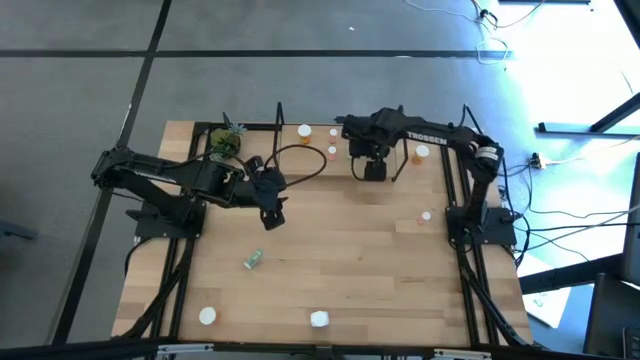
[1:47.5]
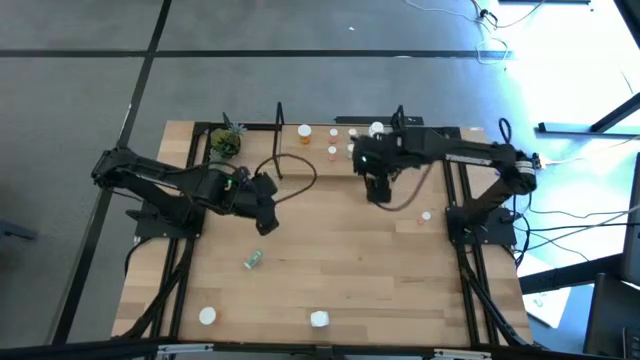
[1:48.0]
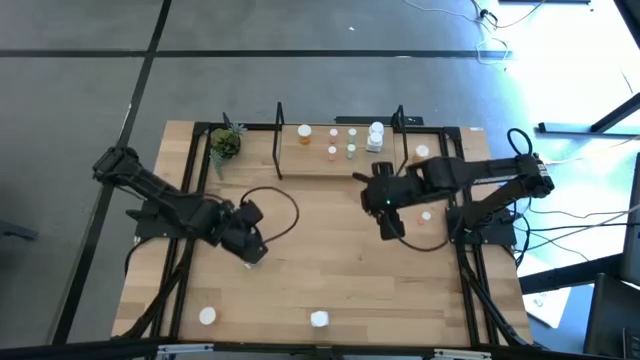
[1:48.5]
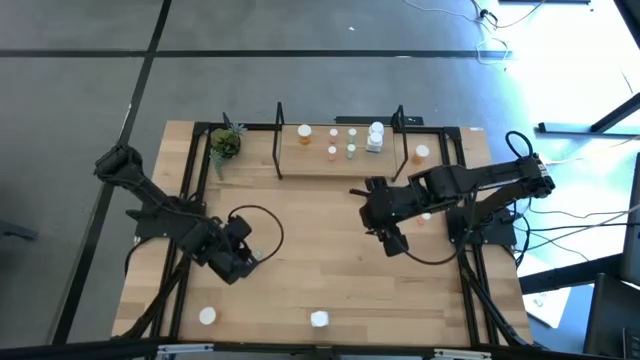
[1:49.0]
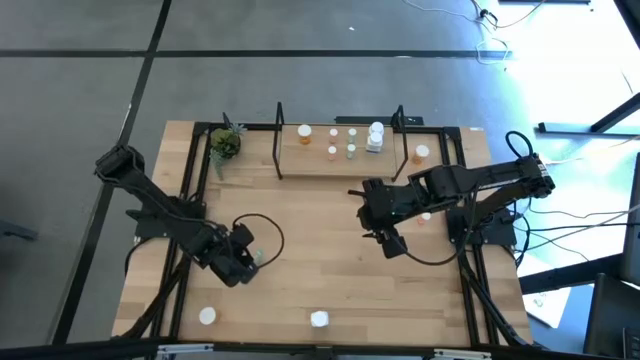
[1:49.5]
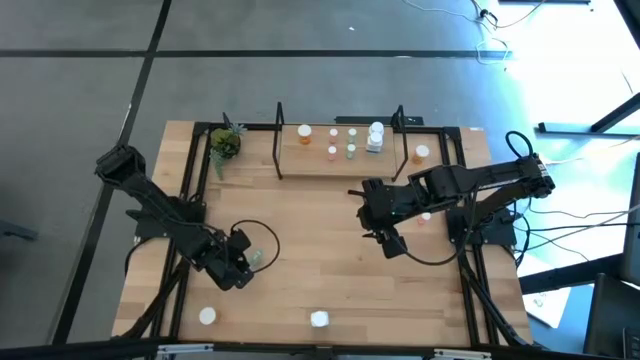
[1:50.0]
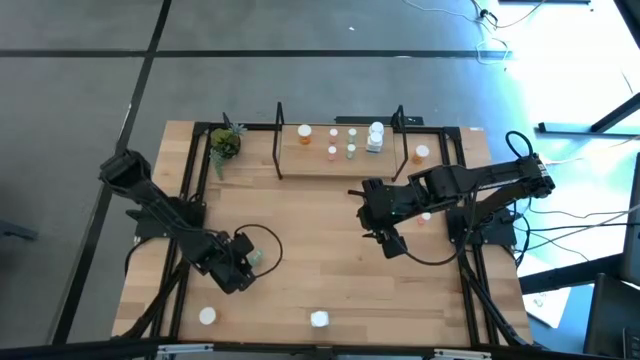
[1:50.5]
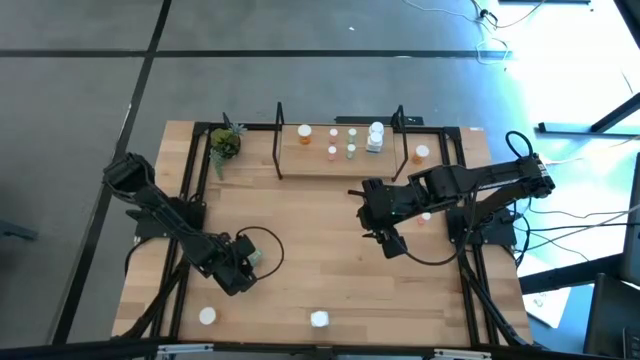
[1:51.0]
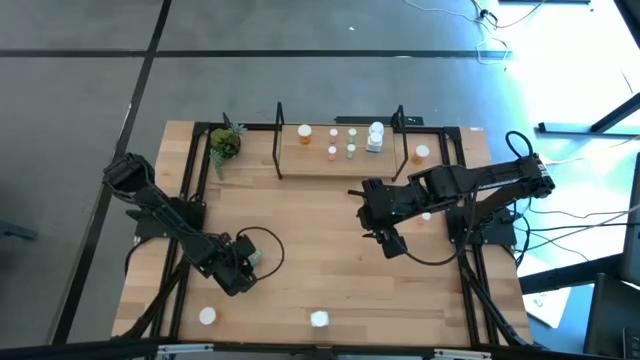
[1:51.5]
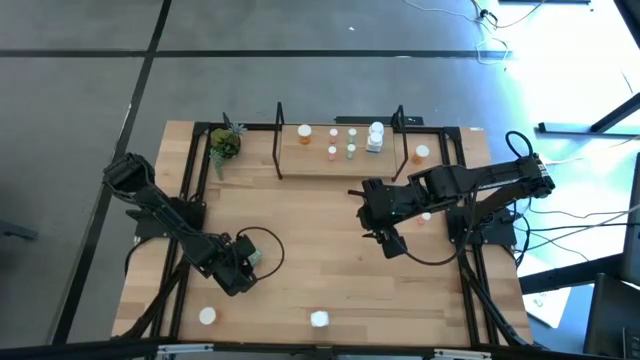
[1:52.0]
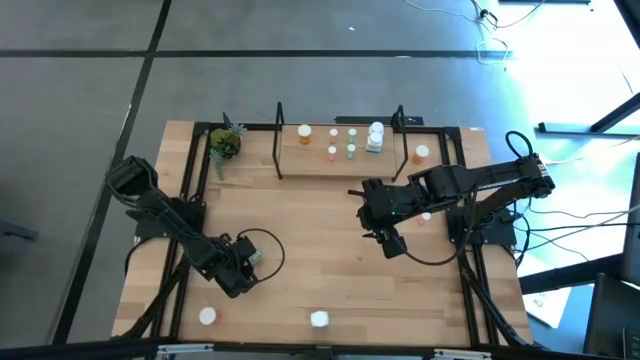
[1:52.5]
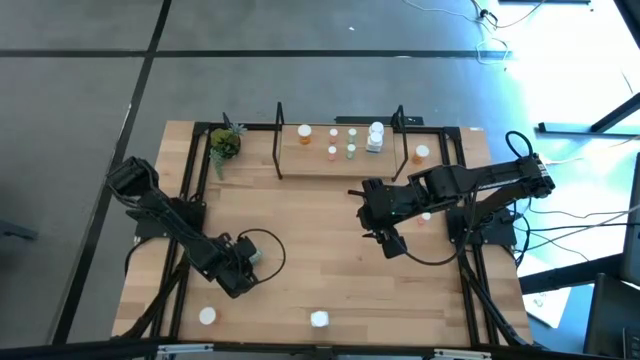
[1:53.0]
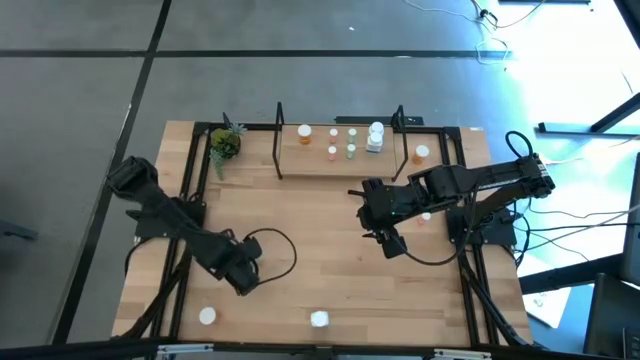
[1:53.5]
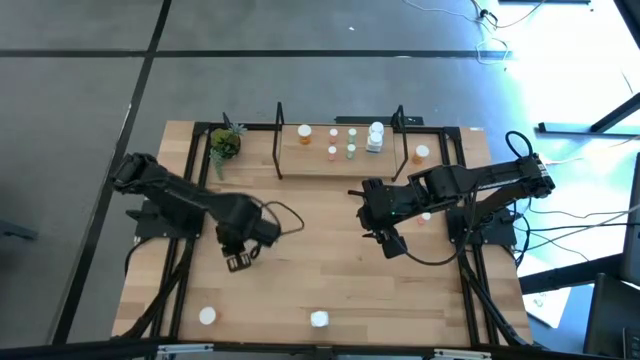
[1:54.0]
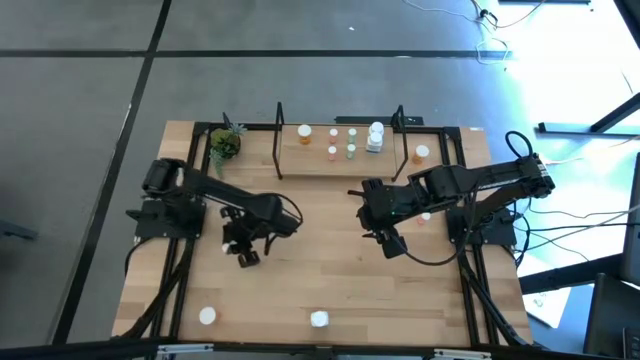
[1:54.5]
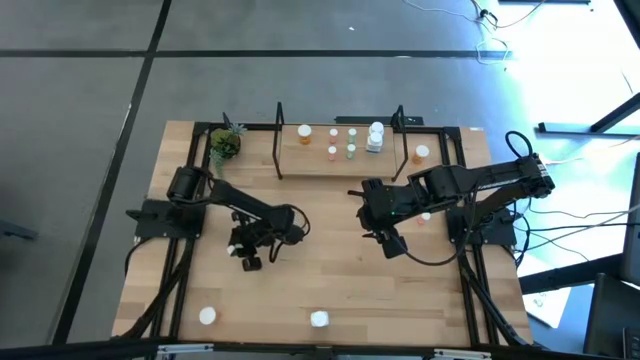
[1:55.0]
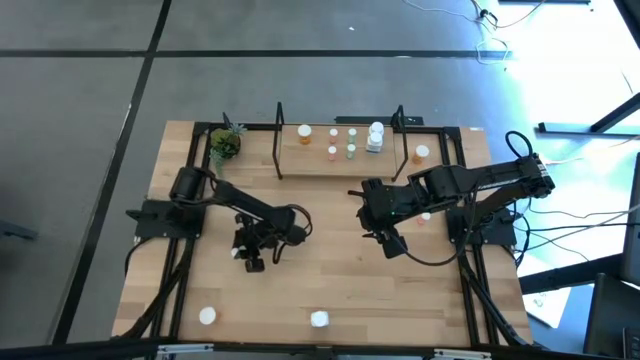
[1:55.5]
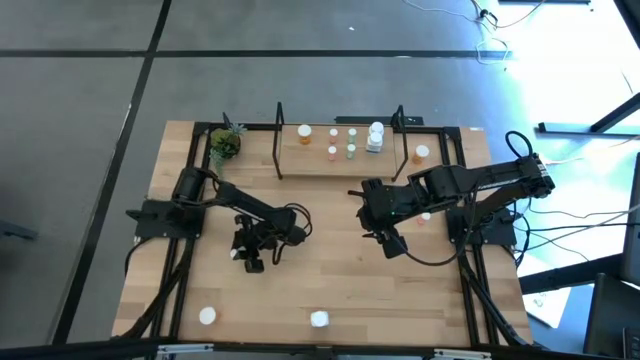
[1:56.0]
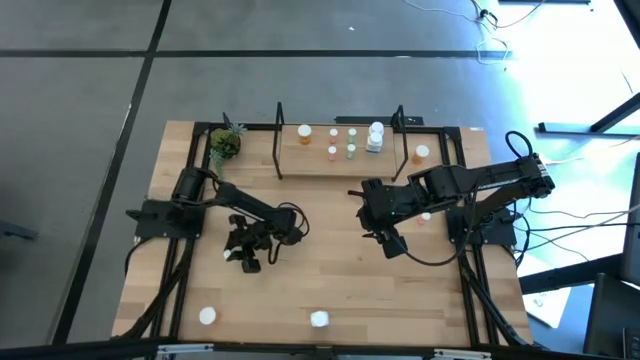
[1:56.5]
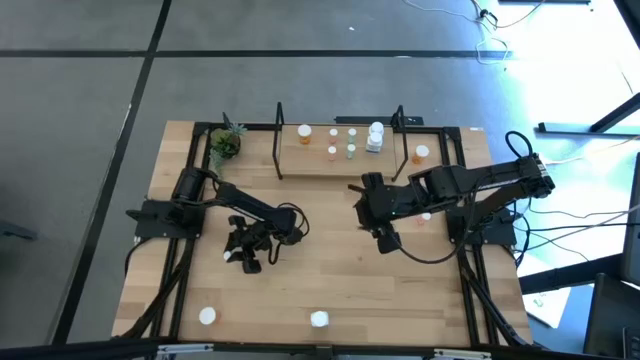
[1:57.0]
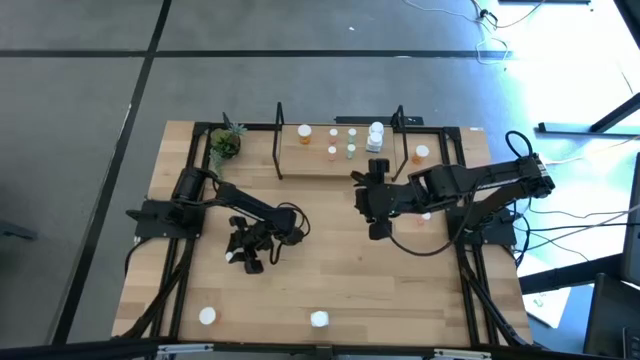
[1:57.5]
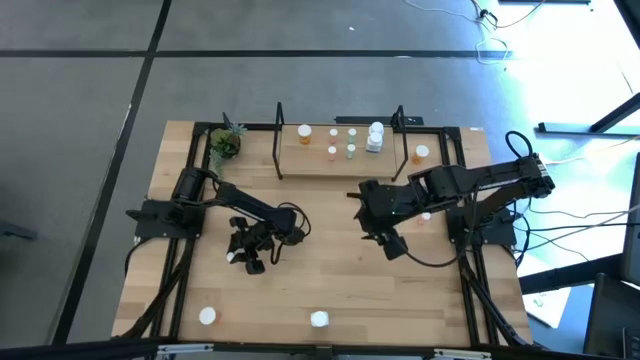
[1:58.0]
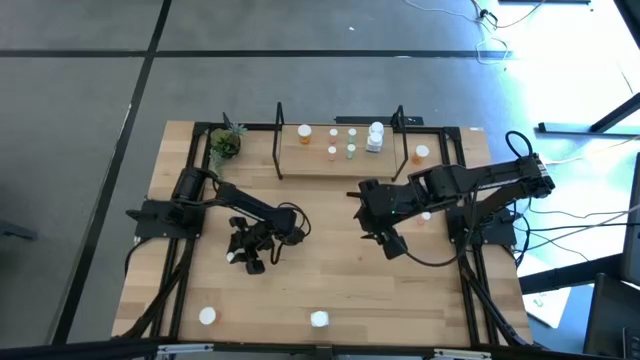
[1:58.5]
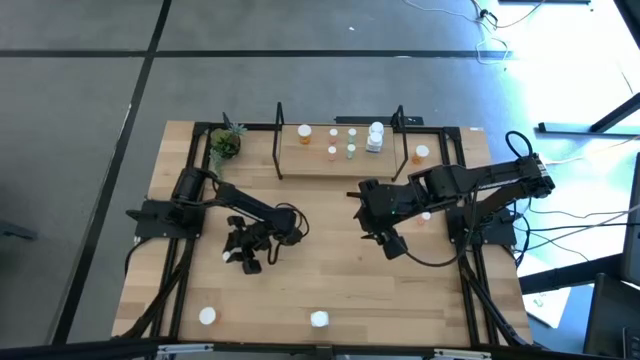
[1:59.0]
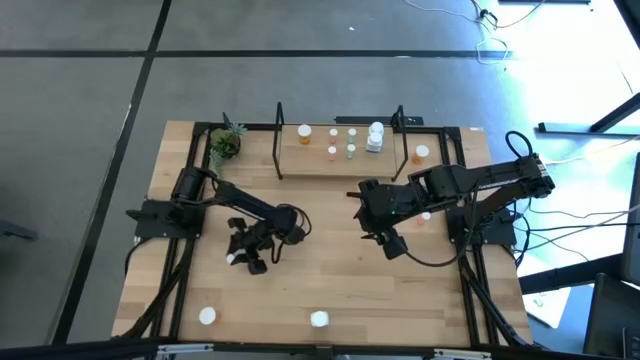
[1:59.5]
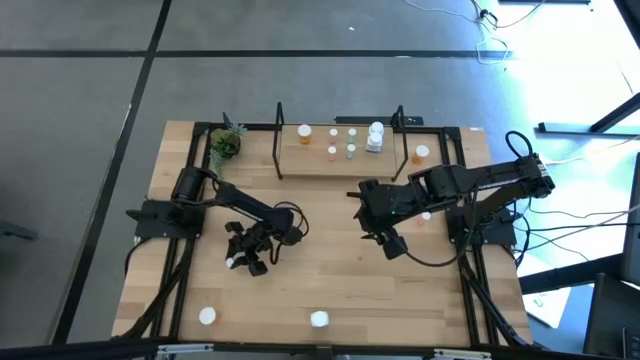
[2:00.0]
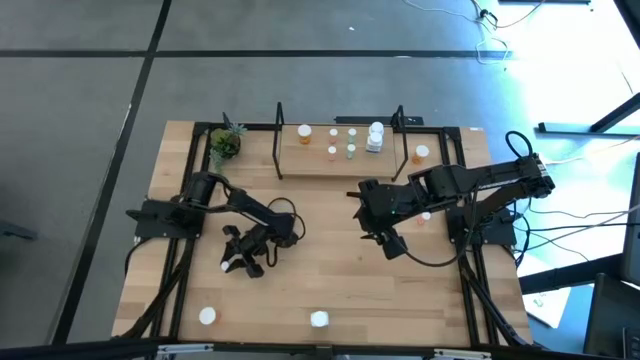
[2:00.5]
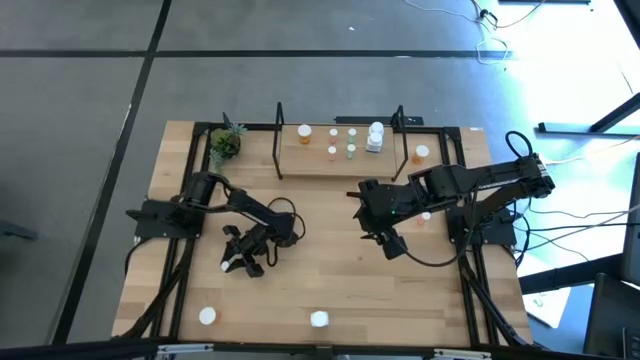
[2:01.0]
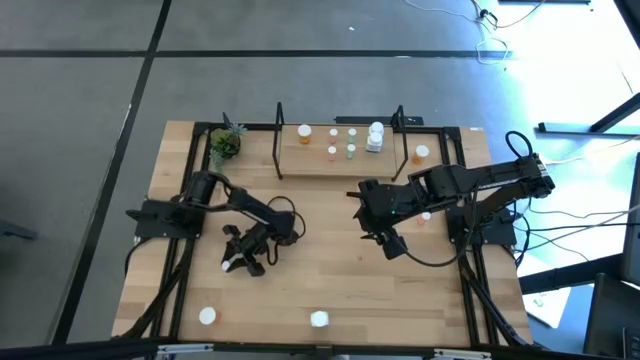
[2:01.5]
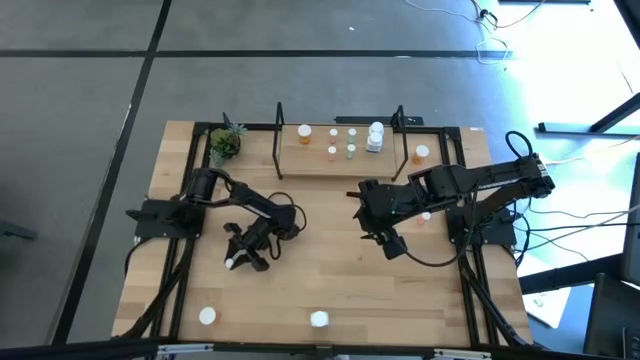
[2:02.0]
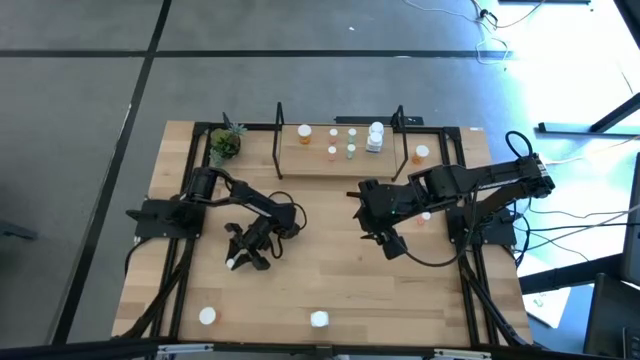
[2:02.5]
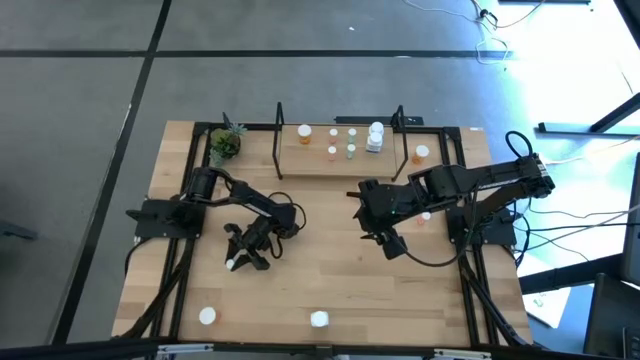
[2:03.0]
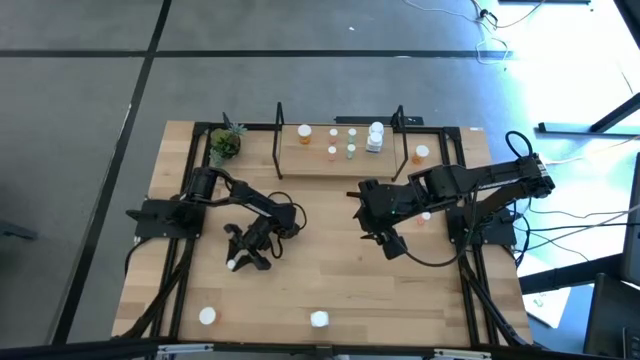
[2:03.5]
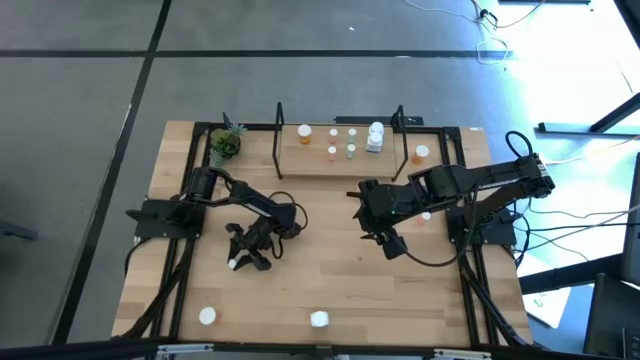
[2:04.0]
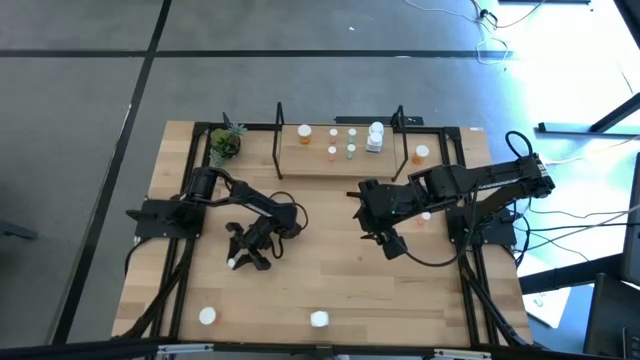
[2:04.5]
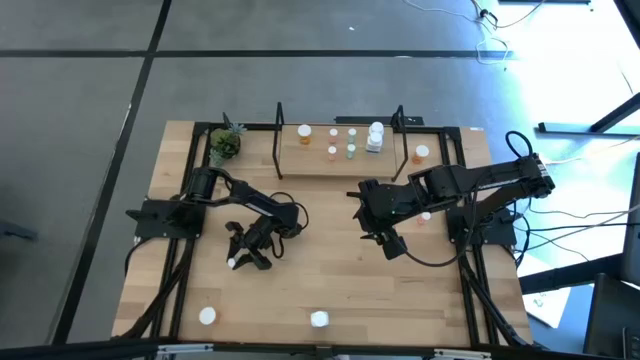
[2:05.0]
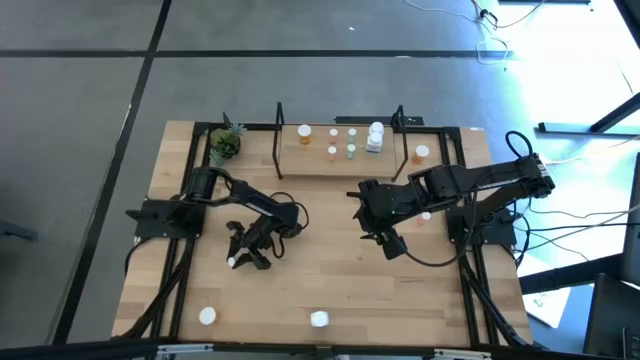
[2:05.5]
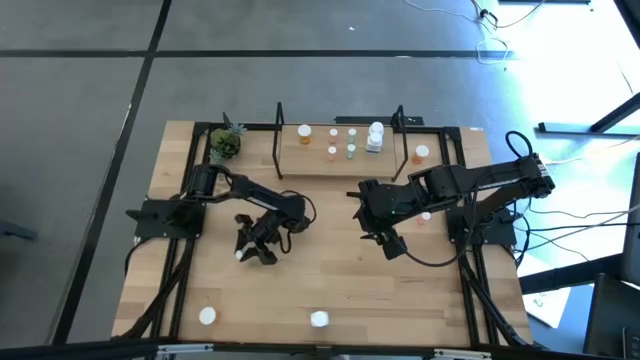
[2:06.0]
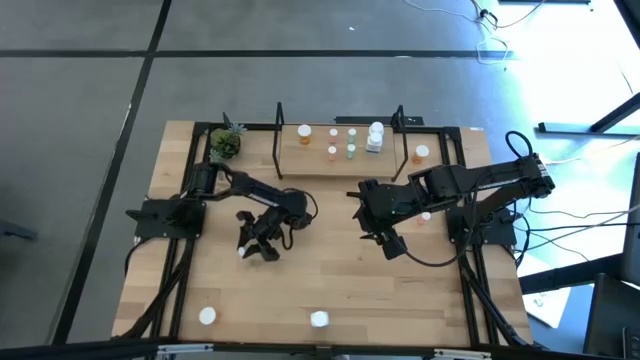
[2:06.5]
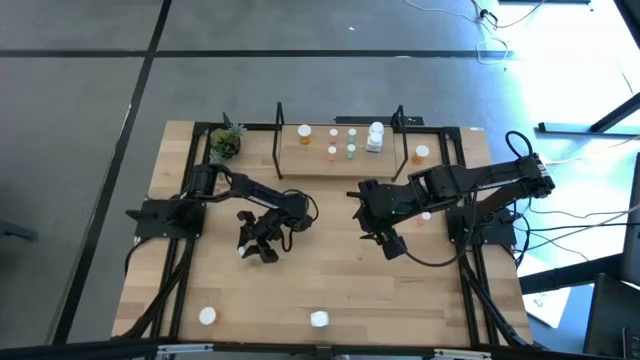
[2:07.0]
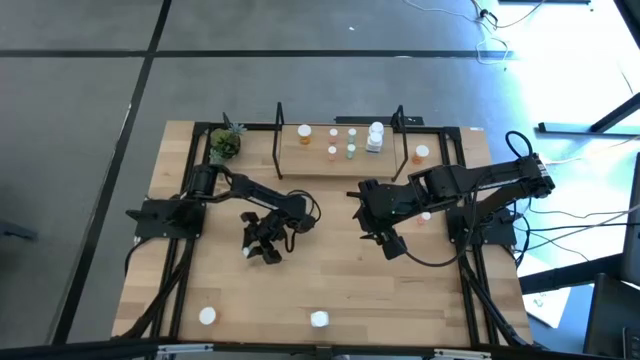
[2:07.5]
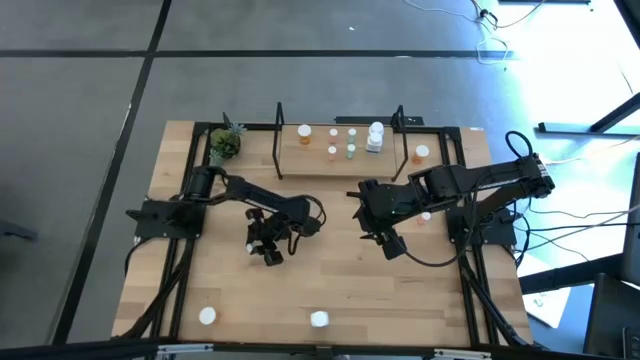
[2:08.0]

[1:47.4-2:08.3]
Task: Pick and place medicine bottles onto shelf by color
Put the green pill bottle on the shelf aligned with the green bottles

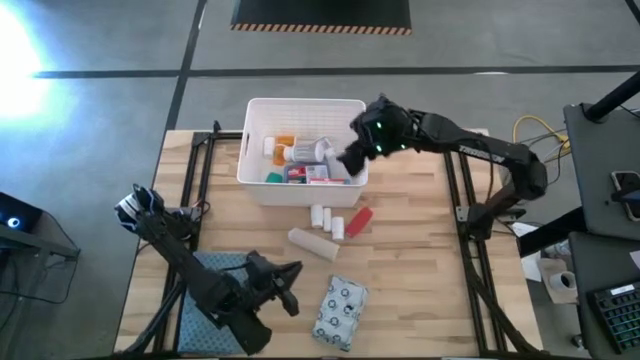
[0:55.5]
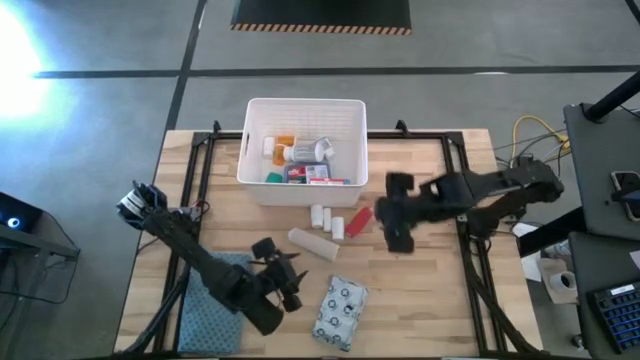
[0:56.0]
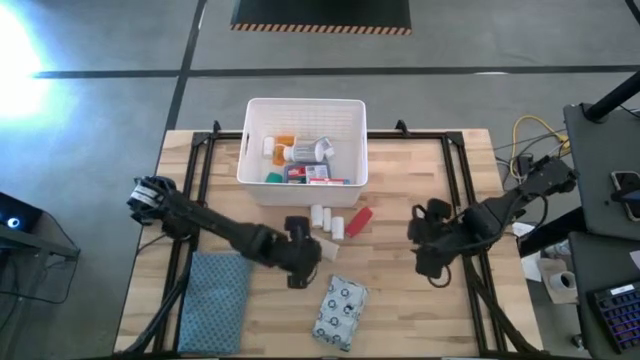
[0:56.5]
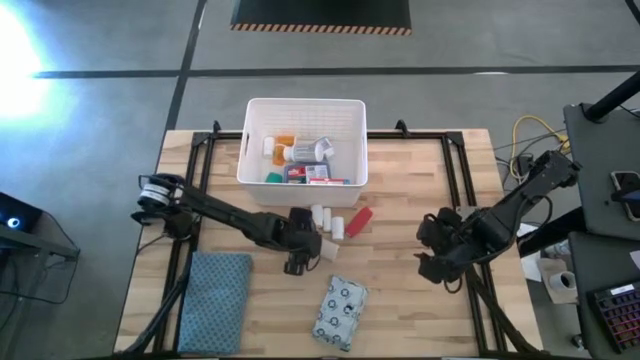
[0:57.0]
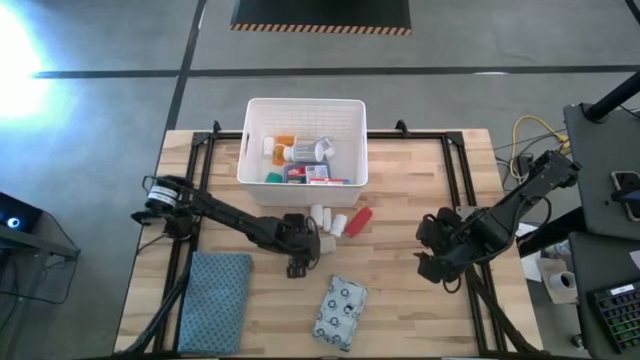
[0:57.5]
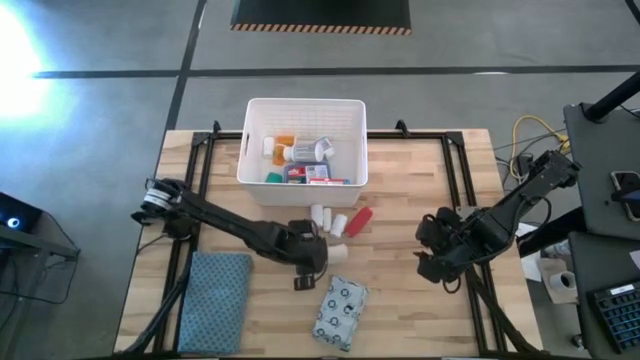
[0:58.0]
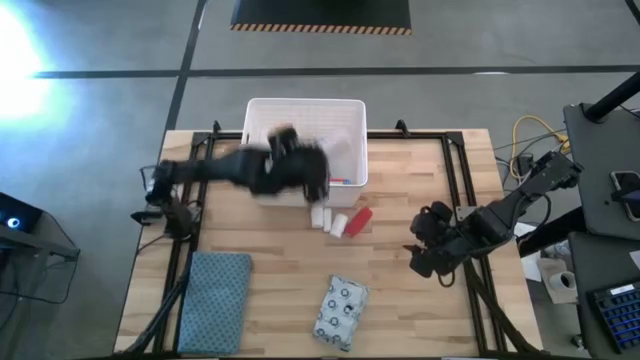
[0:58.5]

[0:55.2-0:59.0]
Task: Pick & place medical supplies in basket/bin
Put the white bandage into the white bin
